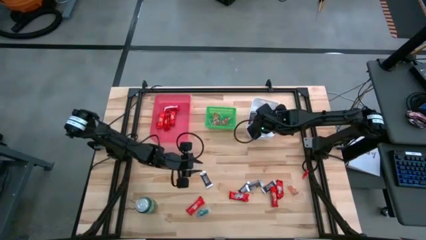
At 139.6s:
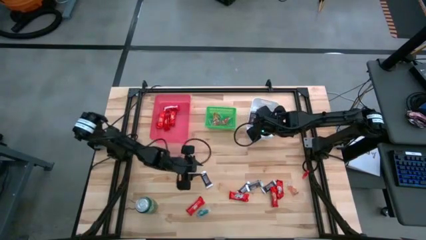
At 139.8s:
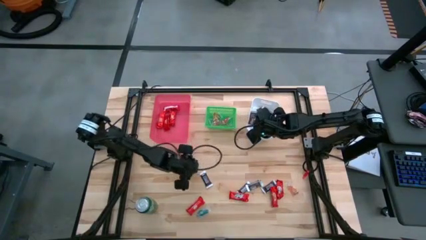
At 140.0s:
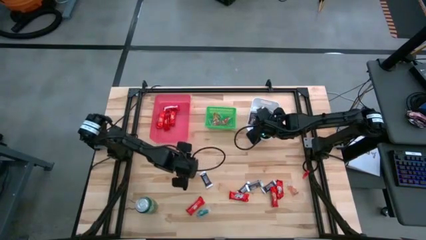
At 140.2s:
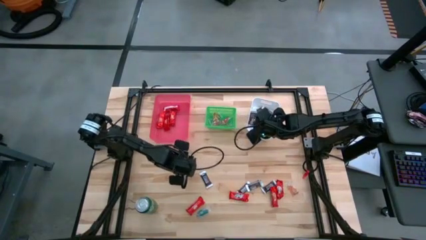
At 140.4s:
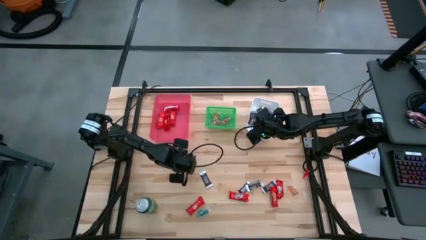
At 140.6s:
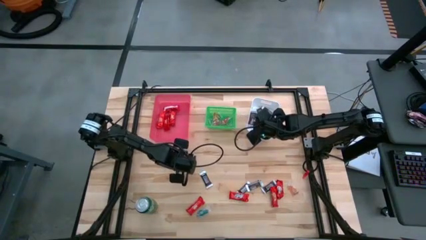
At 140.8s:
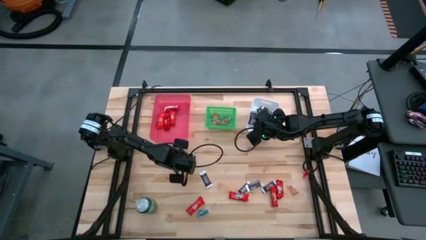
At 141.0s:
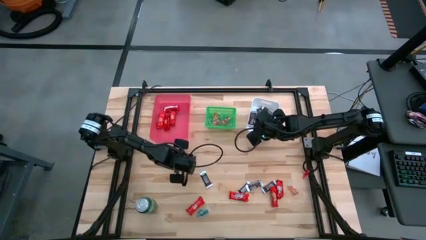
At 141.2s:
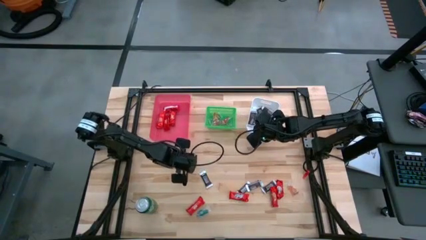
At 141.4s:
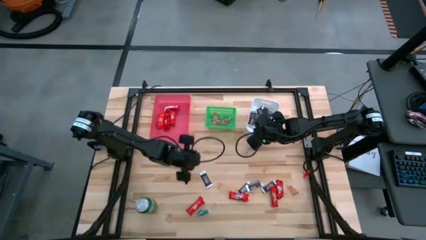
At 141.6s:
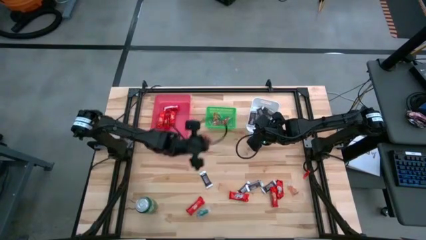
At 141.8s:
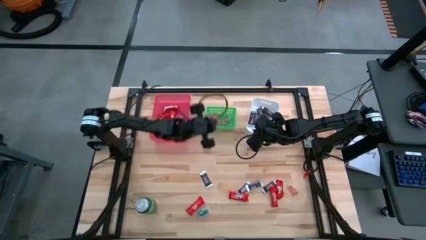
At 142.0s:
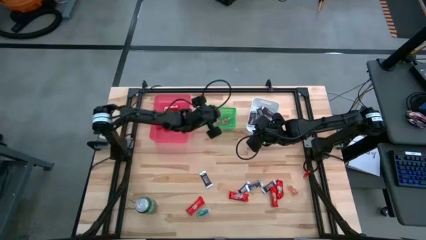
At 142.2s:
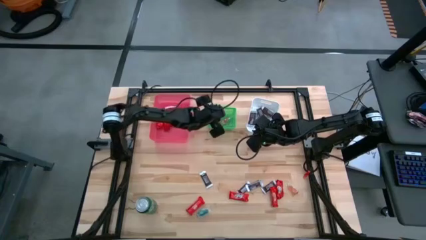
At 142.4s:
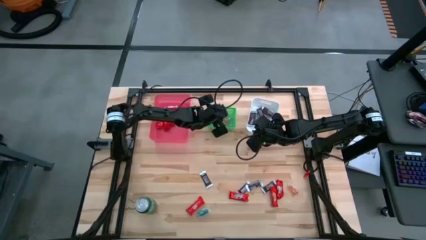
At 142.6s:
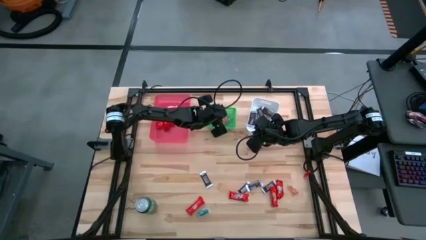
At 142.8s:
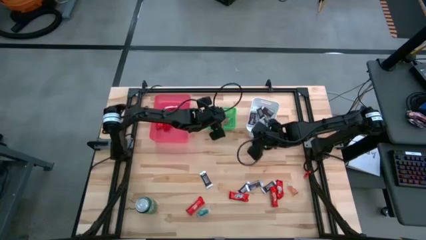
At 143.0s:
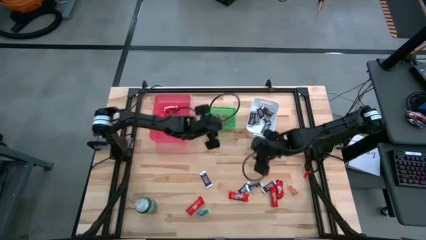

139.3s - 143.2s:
Task: Sort candy
Put the red gummy into the green bin

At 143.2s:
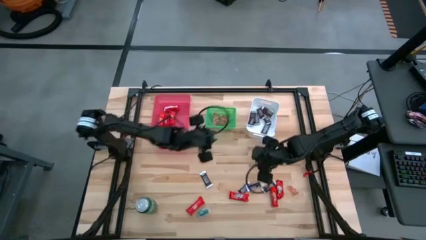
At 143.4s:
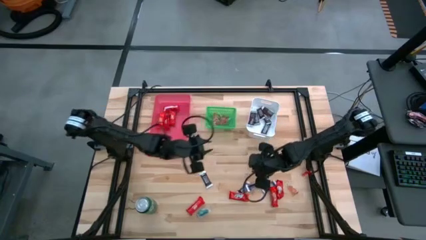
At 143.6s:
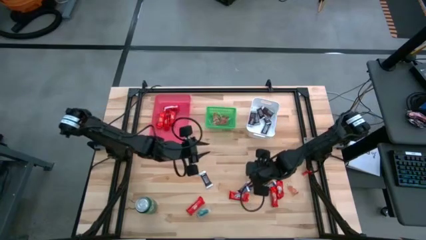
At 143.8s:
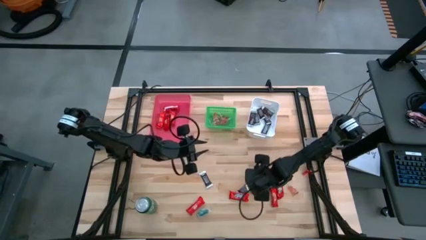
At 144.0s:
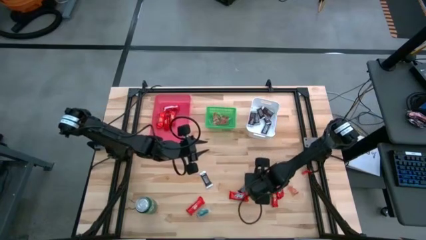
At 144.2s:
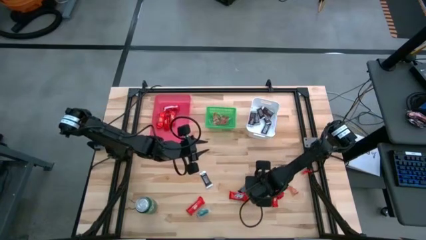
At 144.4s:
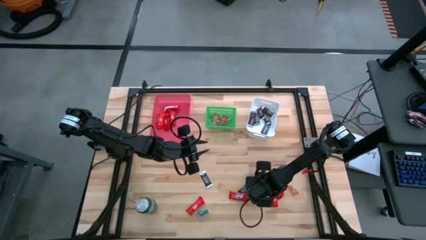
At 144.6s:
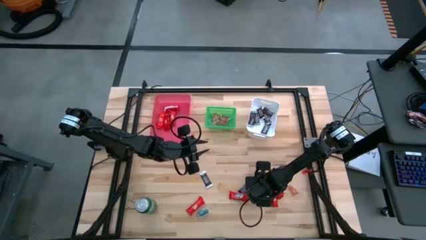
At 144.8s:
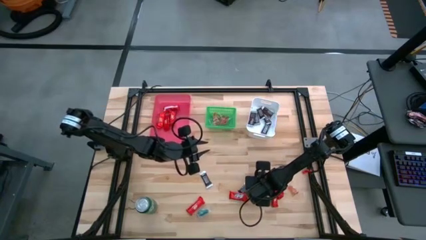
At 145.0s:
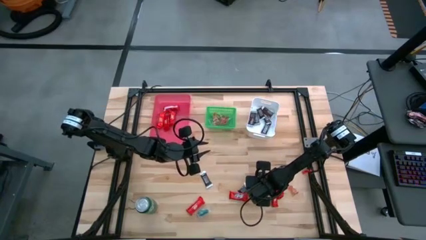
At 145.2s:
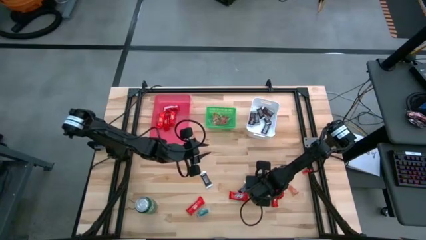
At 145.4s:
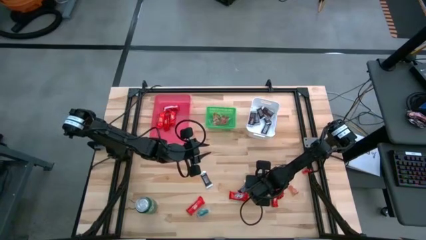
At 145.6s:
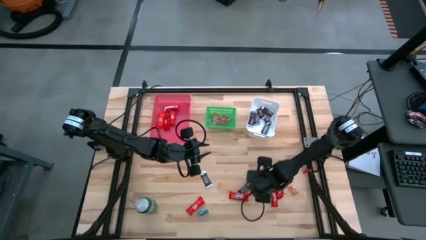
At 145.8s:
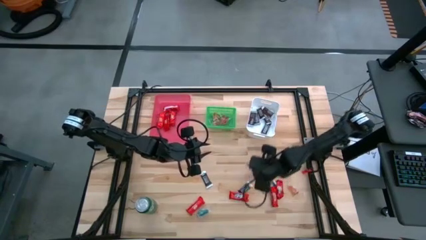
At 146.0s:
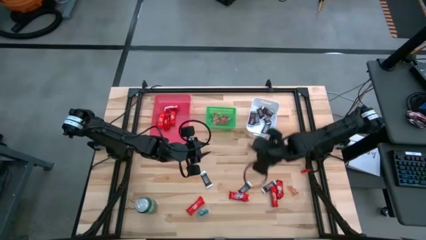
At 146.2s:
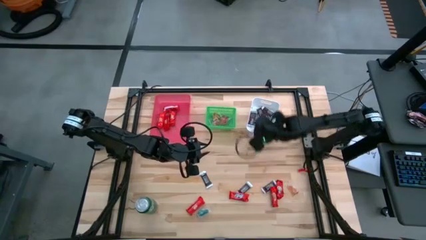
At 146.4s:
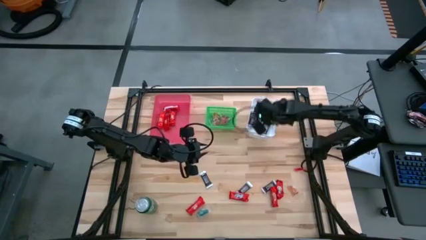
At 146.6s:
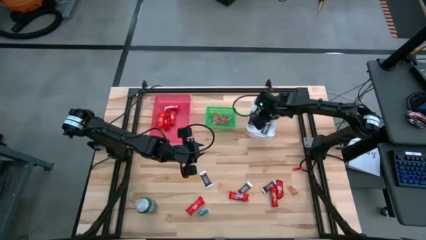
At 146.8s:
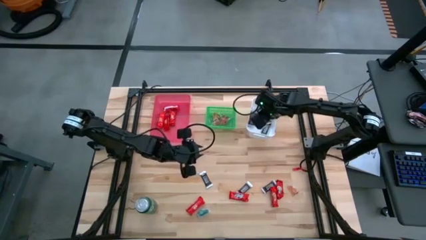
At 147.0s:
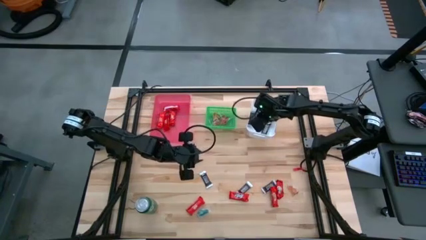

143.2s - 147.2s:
Put the brown chocolate bar into the white bin

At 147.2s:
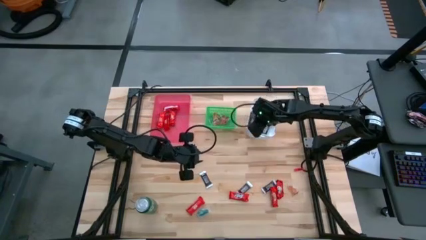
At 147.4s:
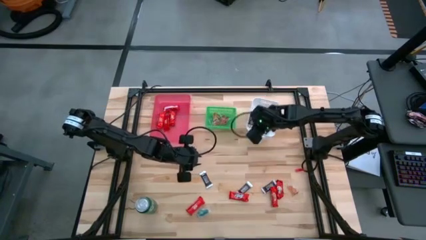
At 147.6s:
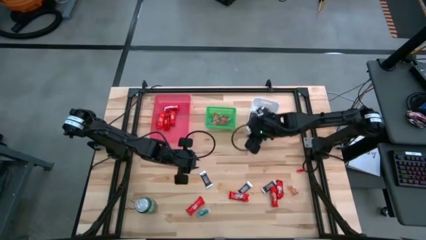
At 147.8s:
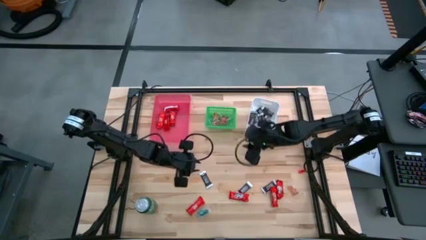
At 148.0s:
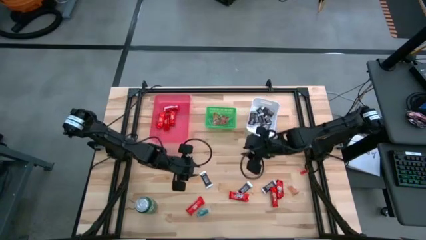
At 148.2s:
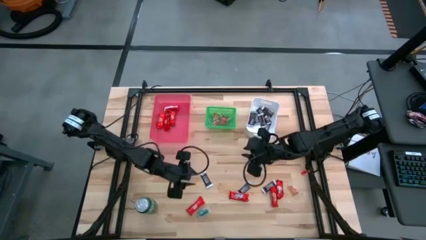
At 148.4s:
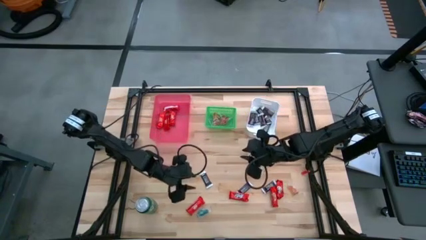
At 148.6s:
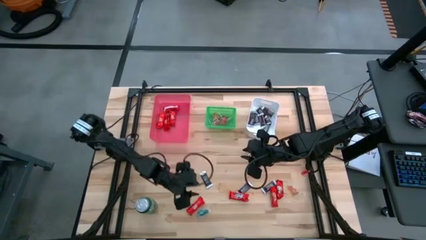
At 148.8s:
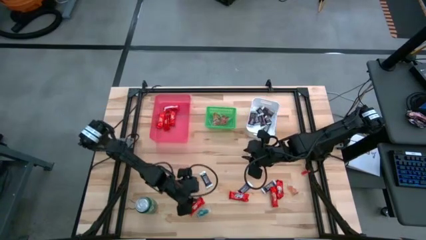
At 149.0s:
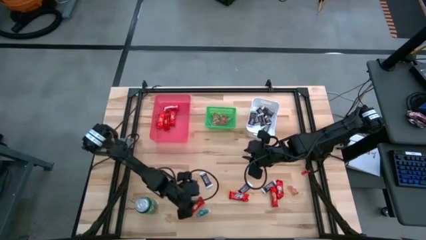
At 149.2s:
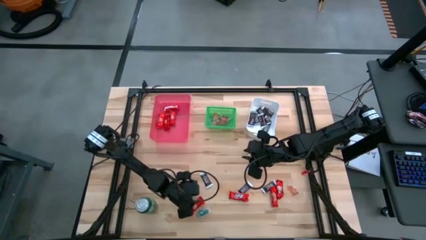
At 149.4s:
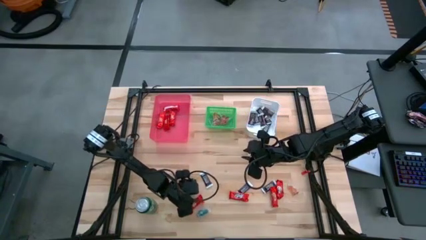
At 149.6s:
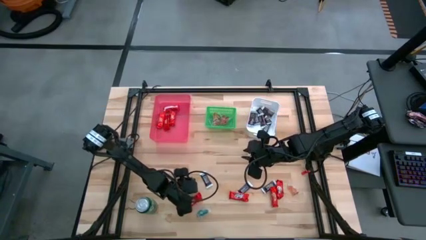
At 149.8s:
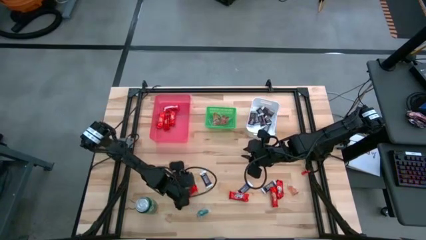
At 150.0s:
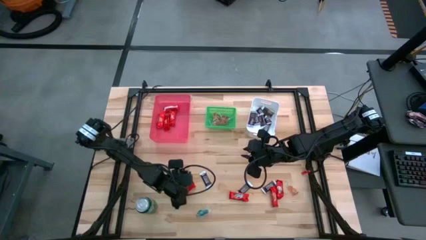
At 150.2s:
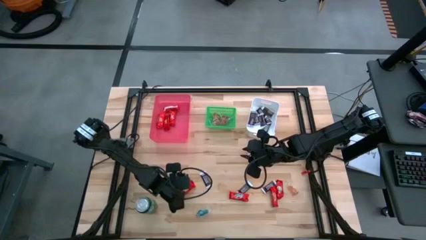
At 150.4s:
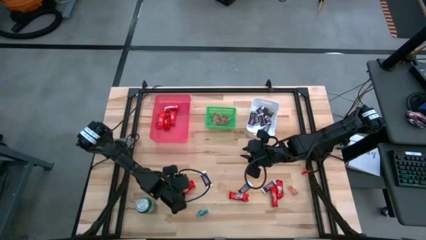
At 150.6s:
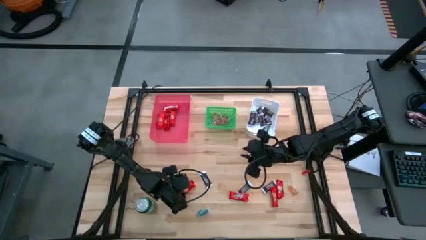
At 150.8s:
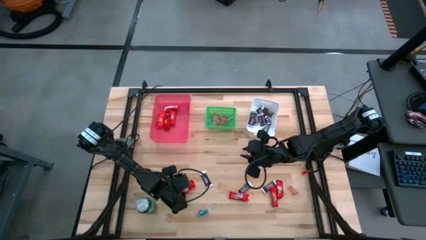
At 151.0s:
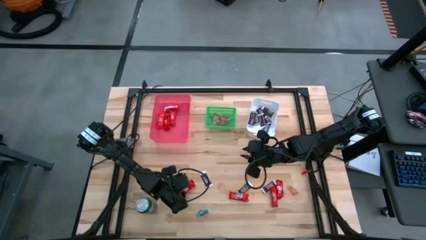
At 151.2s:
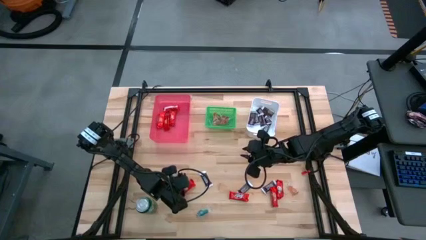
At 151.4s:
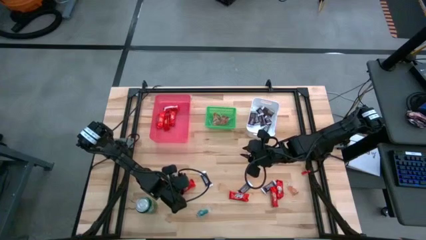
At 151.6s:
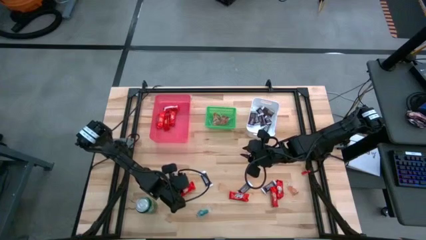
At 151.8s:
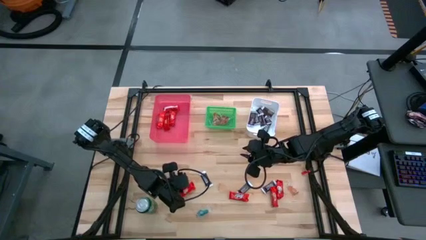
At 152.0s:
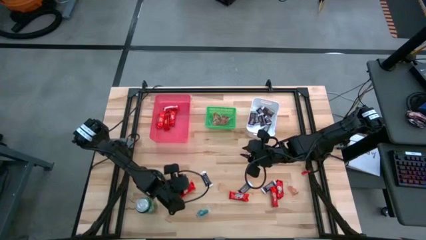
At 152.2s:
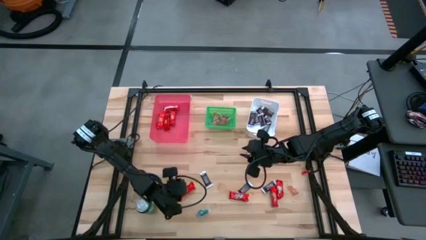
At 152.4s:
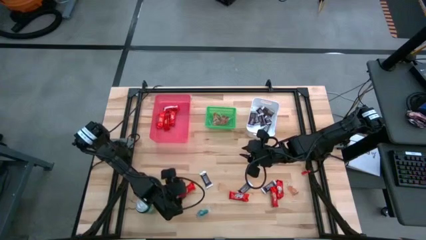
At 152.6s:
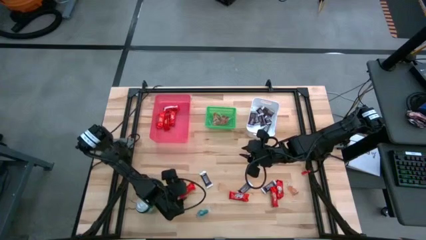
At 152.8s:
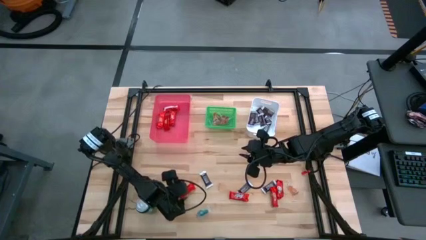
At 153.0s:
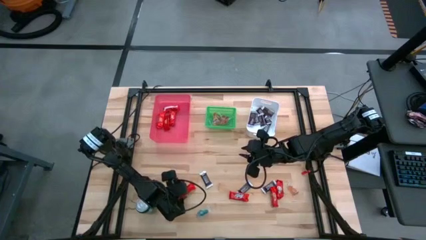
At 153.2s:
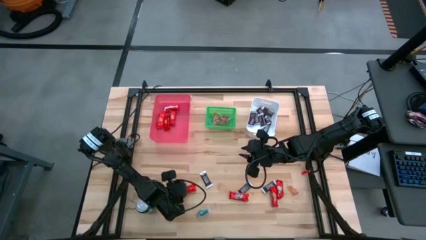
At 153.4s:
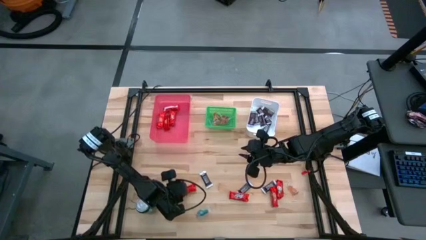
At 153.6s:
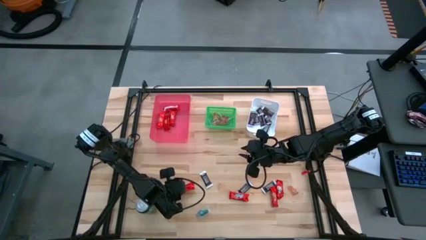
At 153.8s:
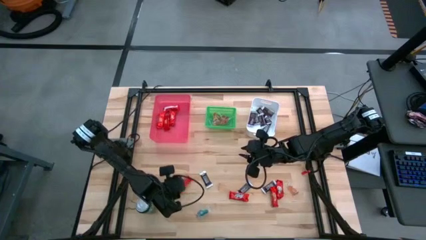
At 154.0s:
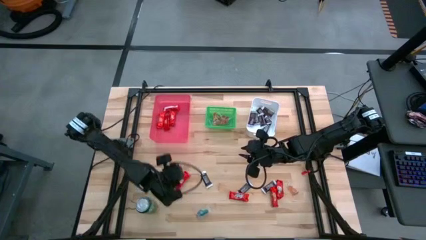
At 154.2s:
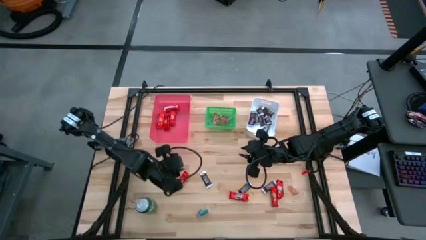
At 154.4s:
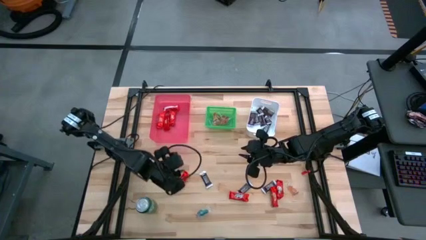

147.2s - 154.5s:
Put the red chocolate bar into the pink bin

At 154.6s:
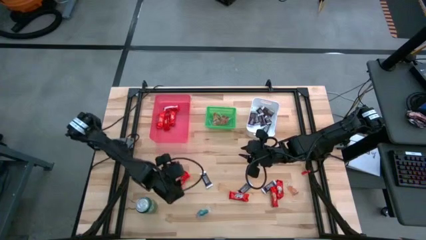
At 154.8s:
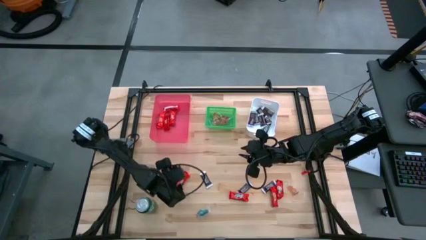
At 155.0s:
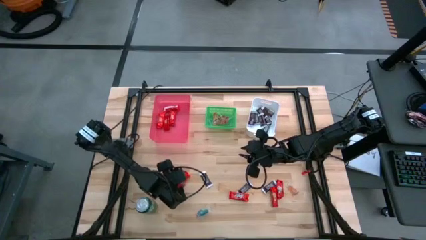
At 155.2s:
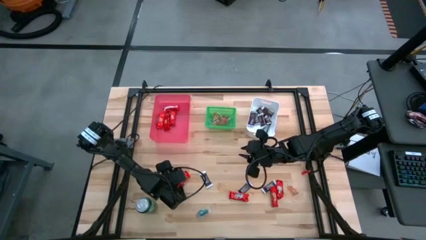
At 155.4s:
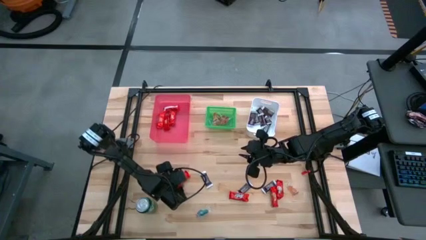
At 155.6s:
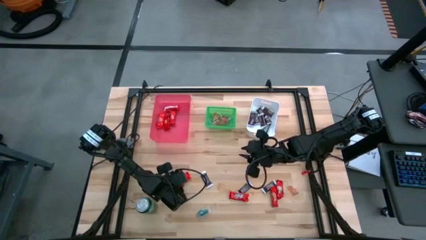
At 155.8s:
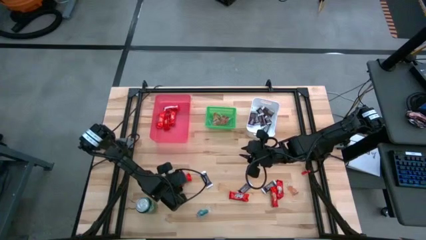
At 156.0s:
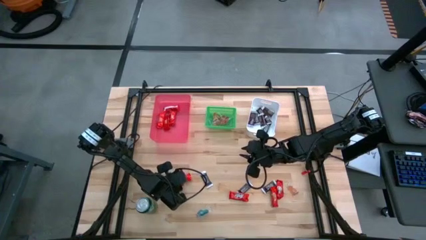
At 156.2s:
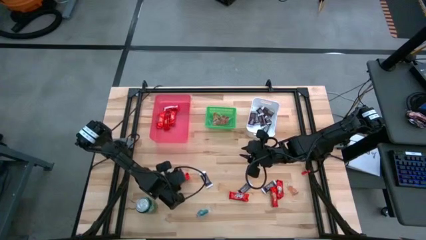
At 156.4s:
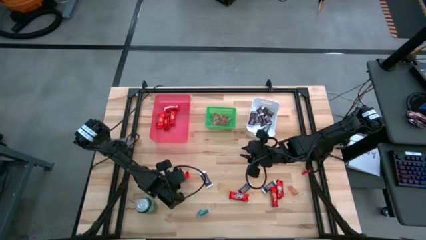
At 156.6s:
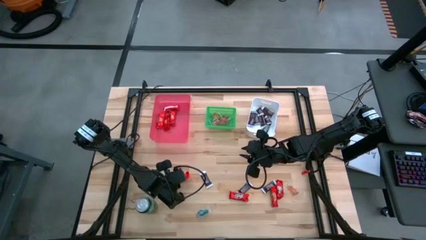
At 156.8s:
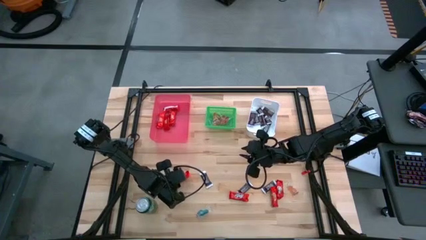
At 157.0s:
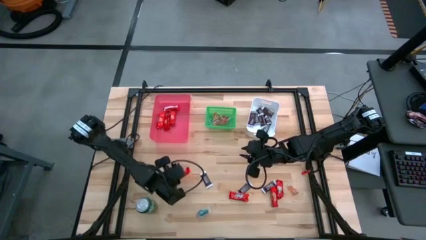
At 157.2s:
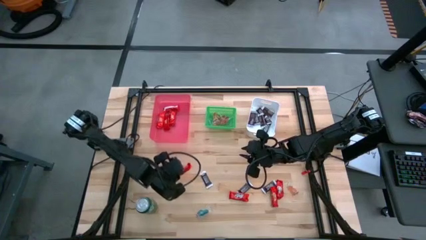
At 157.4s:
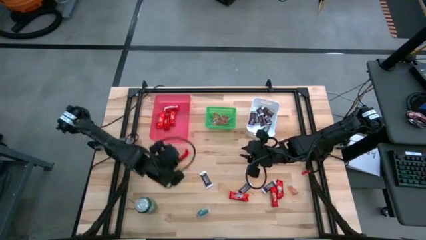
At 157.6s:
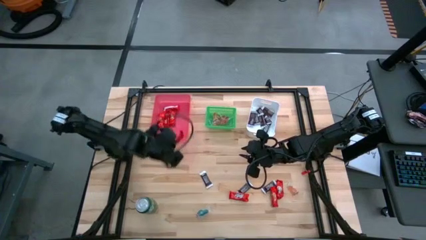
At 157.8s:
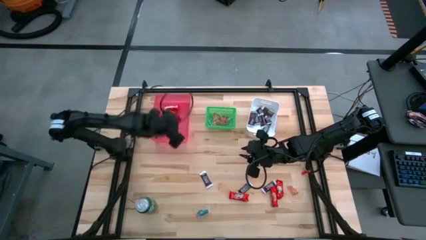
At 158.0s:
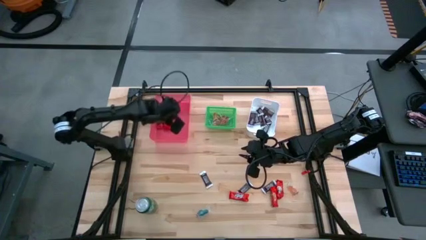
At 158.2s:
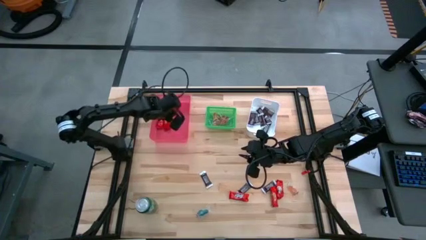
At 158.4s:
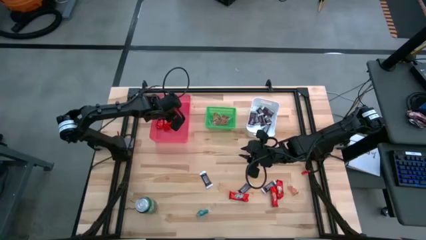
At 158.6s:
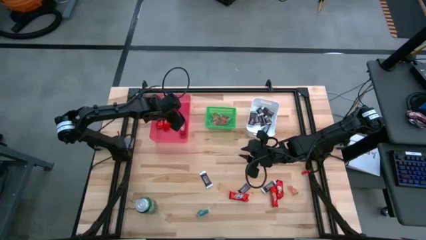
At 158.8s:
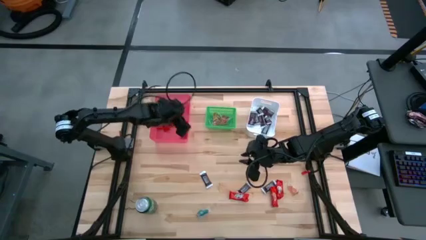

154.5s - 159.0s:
Put the red chocolate bar into the pink bin
